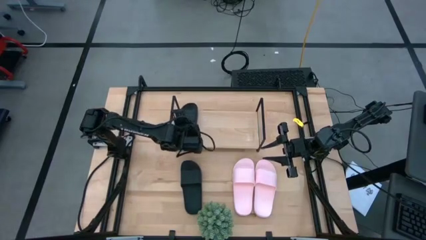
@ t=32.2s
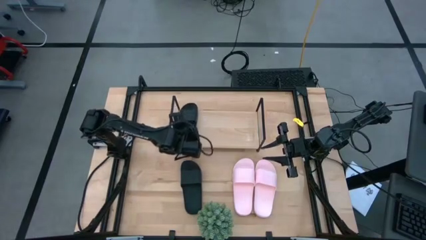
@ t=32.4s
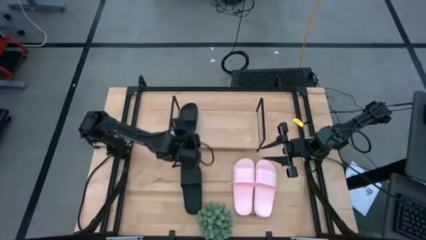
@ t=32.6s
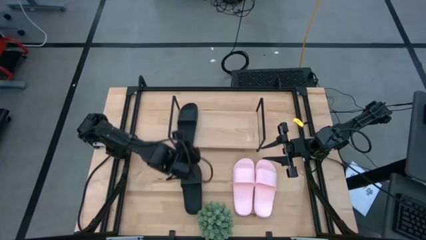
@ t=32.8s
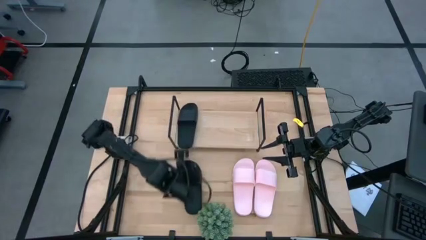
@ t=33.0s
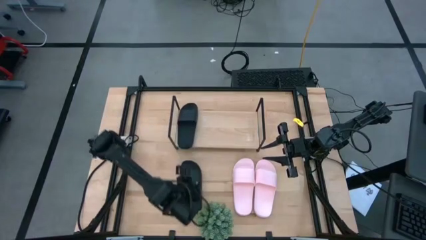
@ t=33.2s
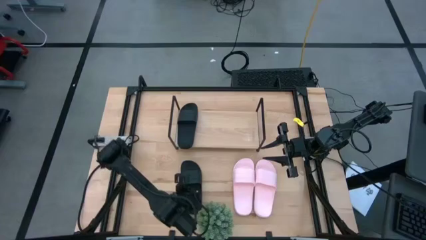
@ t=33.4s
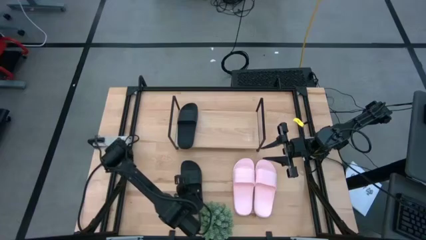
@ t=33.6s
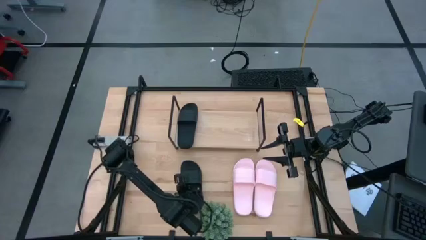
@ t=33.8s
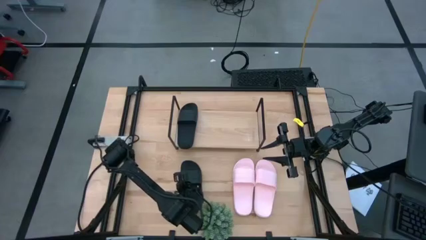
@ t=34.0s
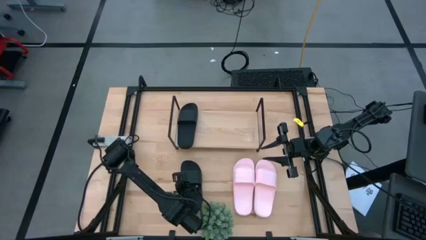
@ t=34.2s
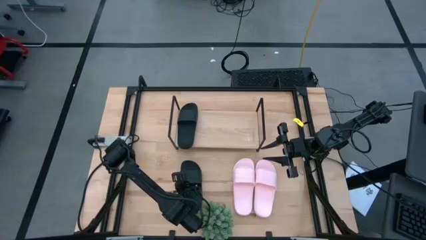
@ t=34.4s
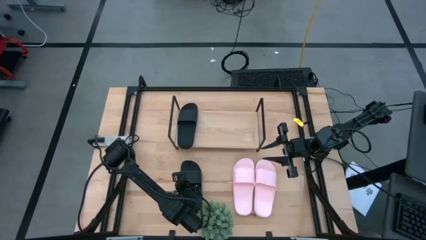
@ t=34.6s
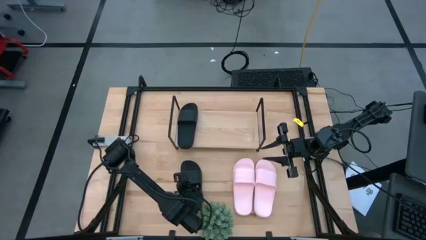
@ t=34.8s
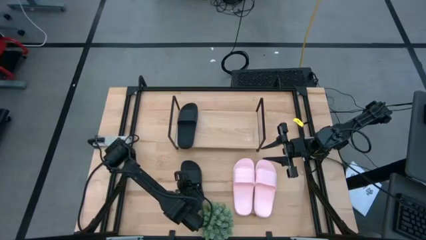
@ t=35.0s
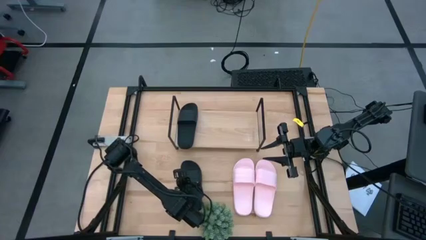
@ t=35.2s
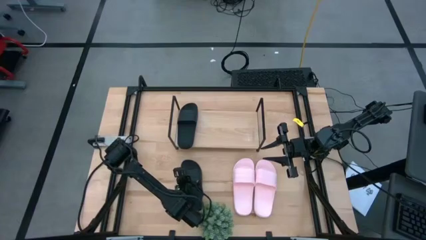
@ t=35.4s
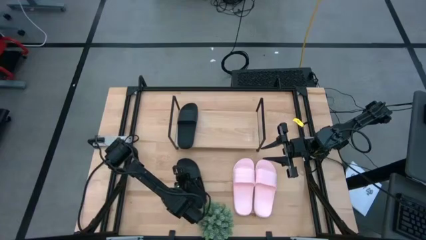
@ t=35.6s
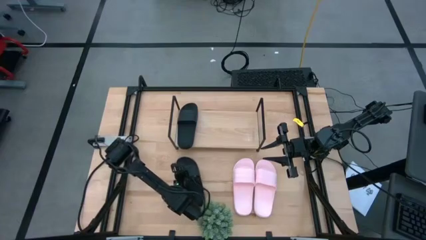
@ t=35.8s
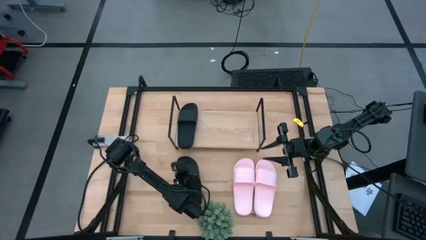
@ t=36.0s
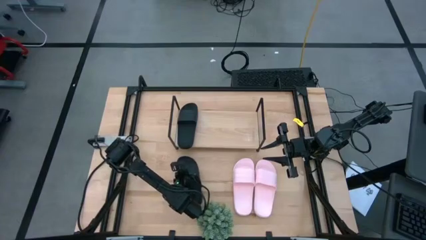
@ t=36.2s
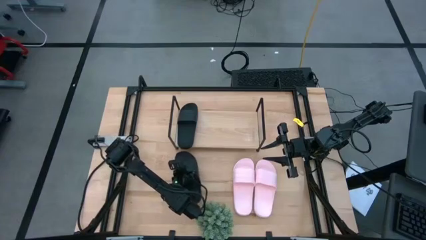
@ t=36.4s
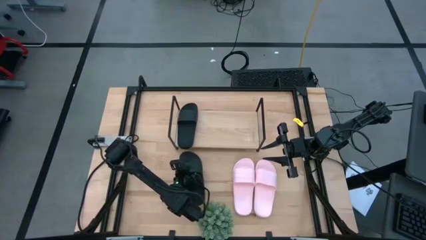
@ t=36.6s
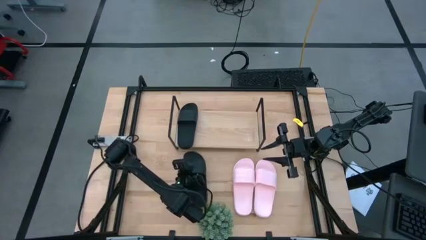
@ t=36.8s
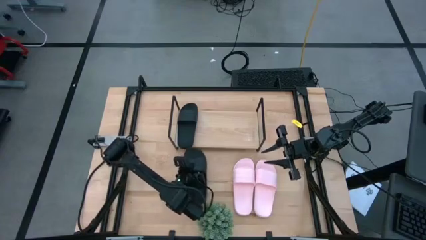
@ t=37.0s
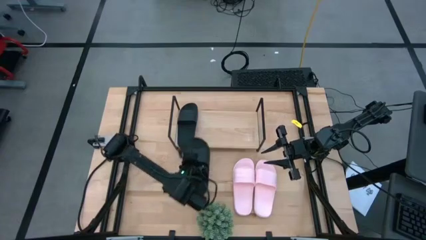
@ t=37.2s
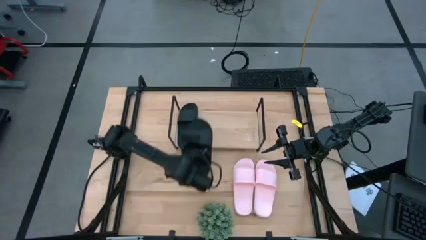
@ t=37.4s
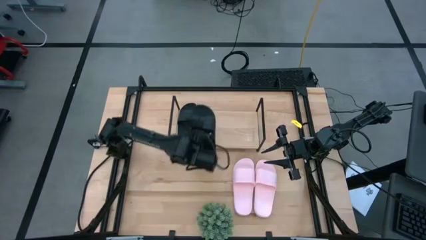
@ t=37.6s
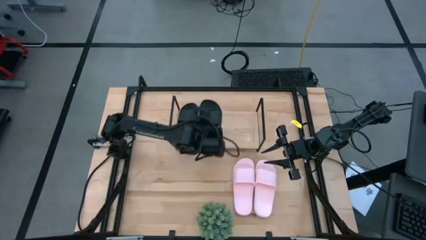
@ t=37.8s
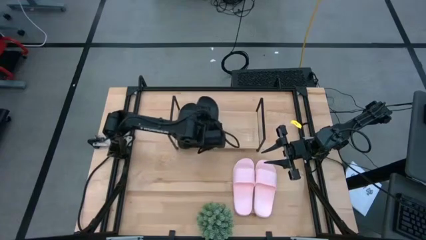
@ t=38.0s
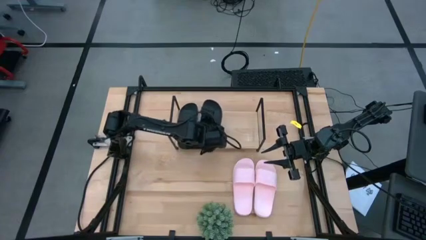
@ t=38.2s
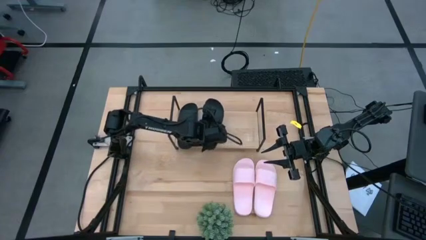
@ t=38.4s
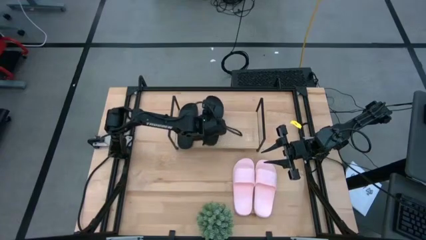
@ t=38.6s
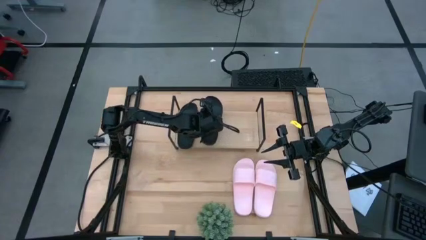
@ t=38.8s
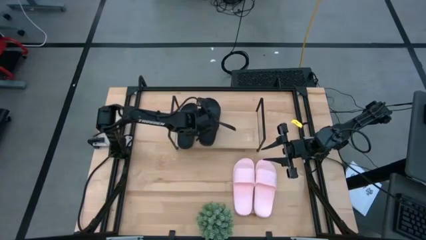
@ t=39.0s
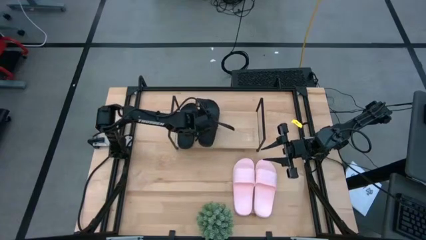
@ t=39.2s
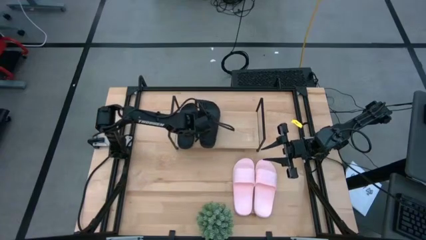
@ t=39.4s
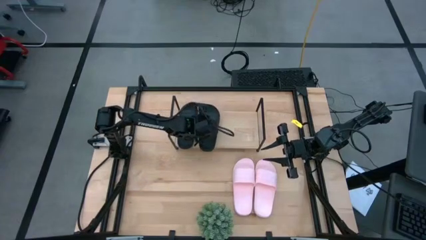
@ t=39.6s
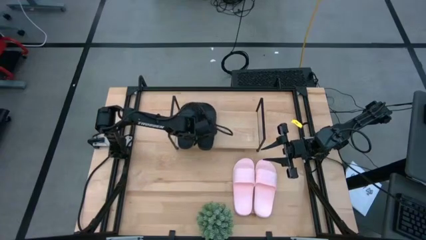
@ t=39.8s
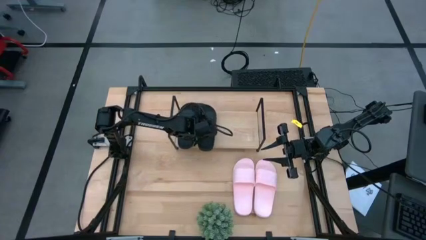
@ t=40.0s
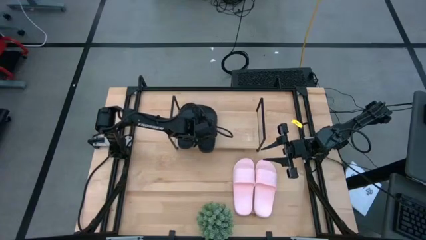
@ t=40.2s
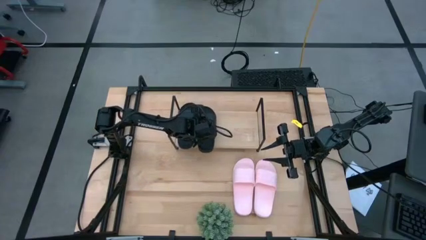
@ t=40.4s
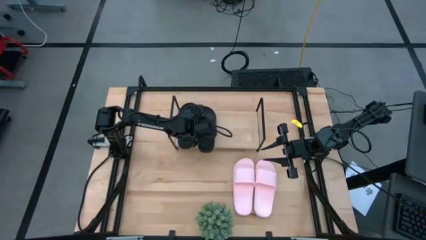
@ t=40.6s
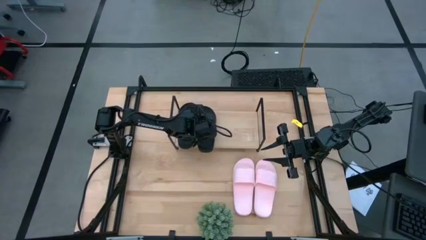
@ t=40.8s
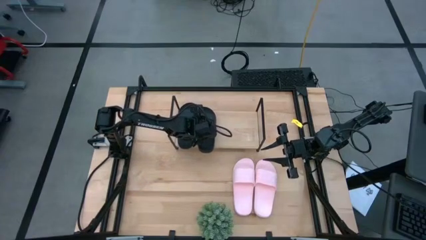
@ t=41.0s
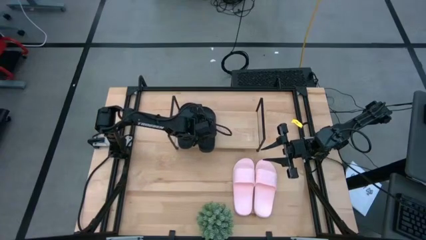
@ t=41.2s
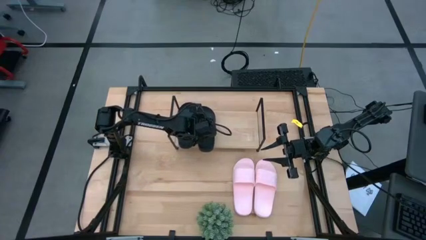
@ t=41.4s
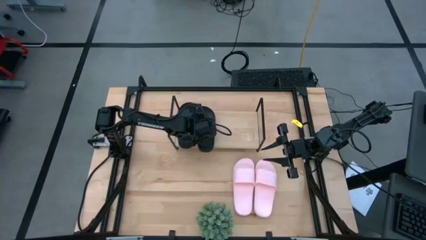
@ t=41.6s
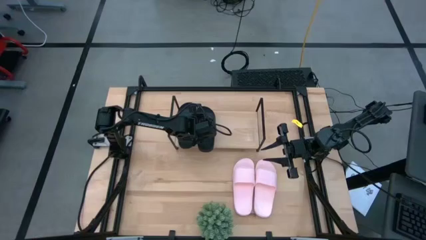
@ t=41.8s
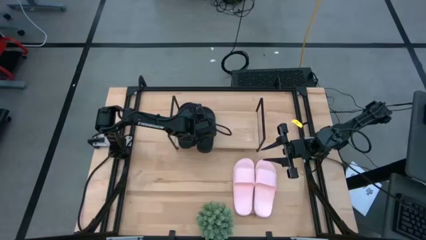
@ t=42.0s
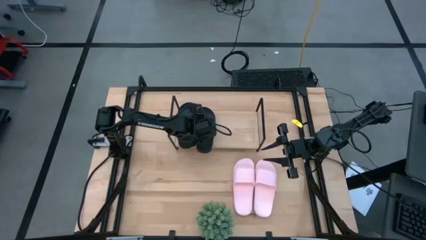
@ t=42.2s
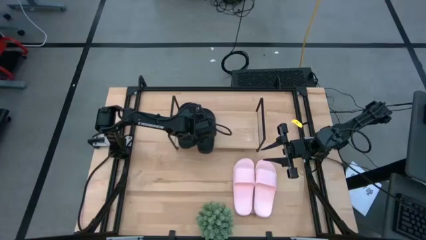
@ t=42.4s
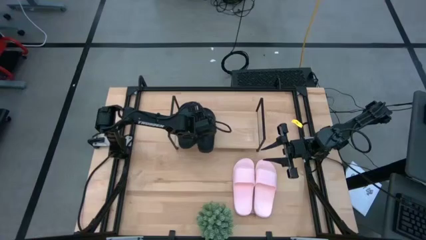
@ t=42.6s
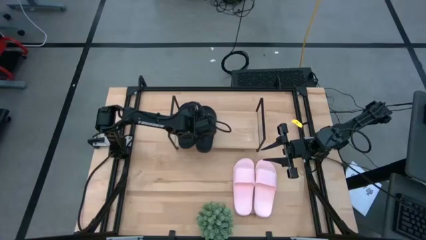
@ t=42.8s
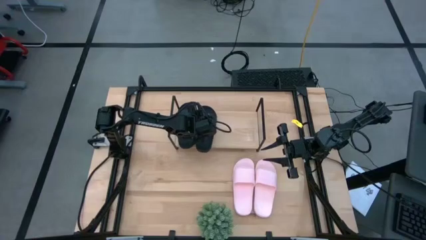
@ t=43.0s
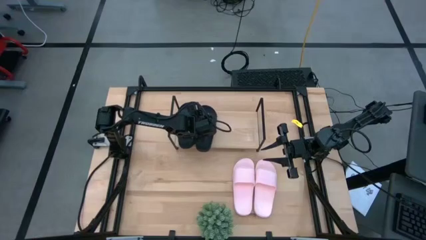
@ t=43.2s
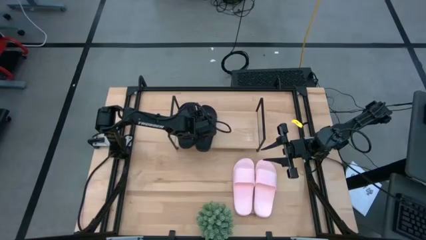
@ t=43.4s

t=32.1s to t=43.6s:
Task: Pick and place slides into the shelf
Put the black slide on the shelf

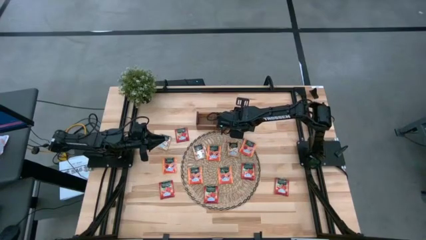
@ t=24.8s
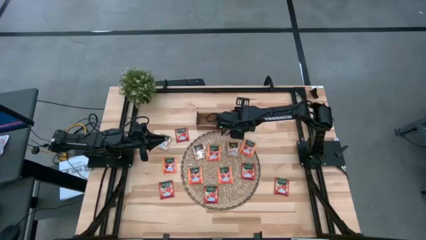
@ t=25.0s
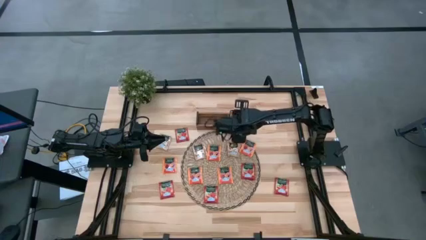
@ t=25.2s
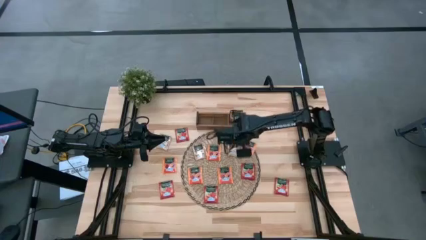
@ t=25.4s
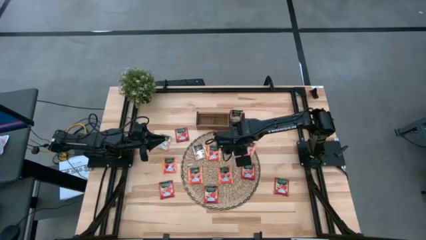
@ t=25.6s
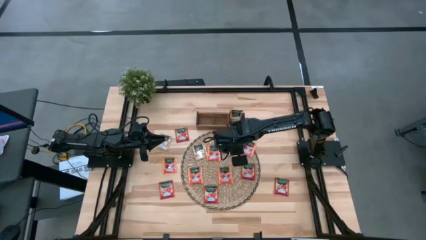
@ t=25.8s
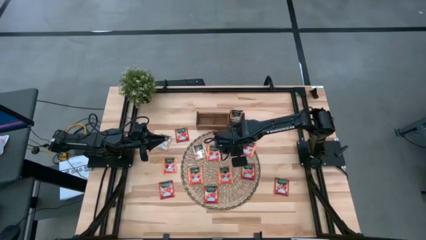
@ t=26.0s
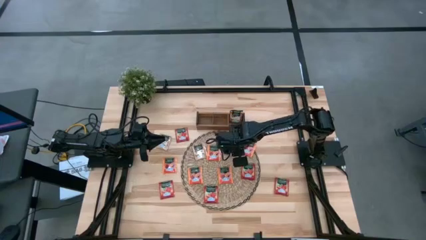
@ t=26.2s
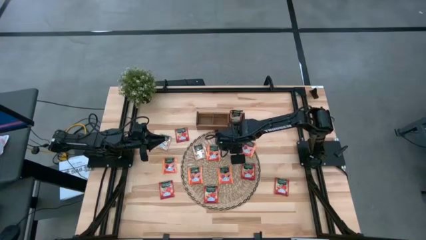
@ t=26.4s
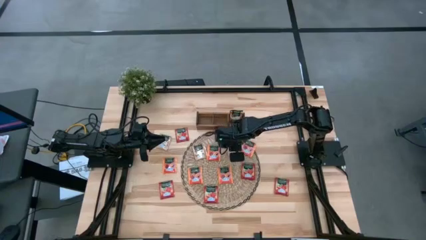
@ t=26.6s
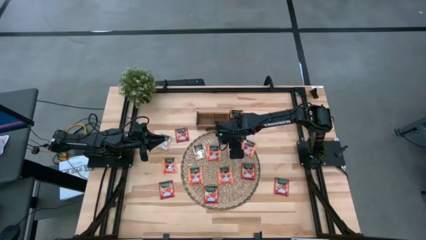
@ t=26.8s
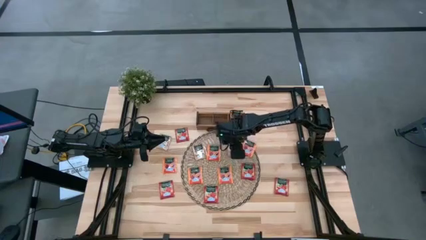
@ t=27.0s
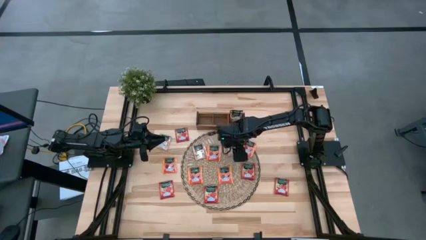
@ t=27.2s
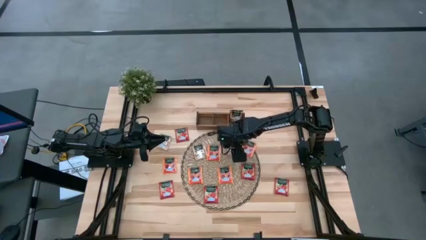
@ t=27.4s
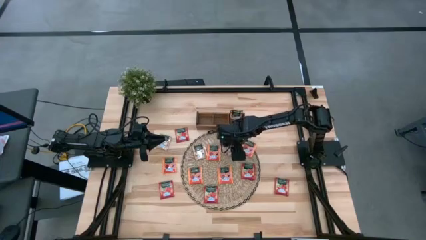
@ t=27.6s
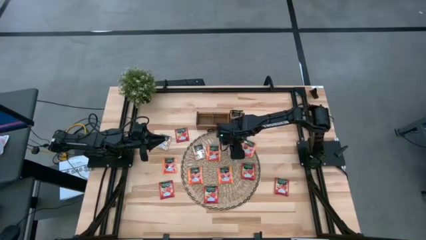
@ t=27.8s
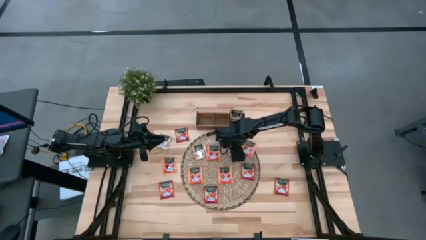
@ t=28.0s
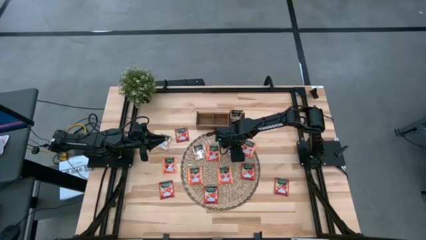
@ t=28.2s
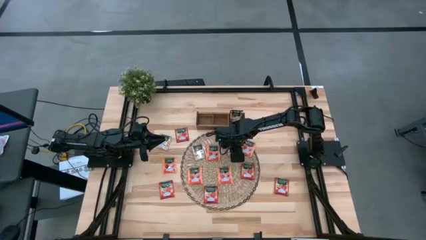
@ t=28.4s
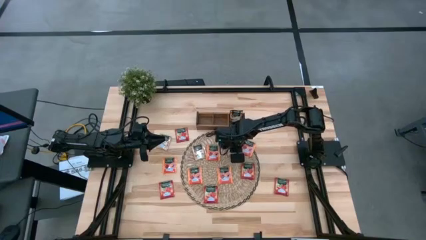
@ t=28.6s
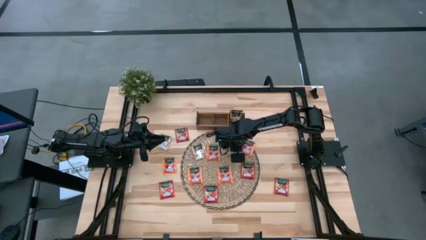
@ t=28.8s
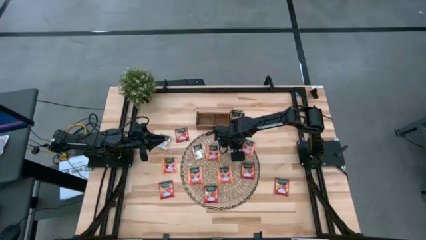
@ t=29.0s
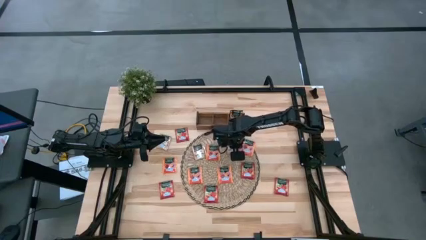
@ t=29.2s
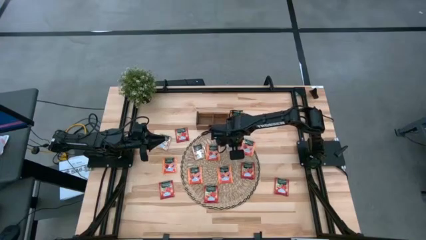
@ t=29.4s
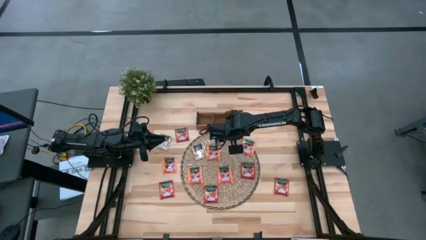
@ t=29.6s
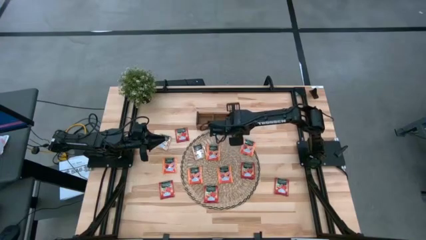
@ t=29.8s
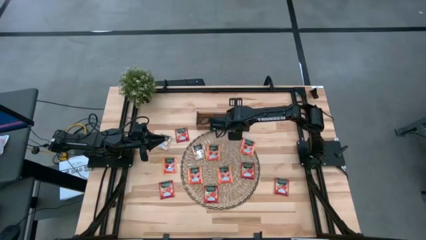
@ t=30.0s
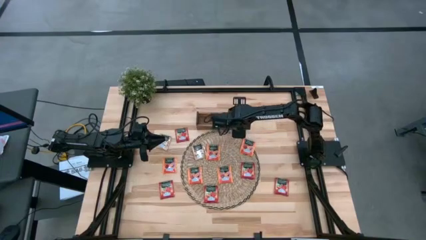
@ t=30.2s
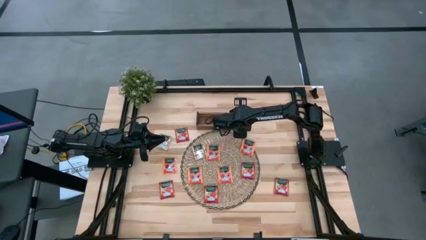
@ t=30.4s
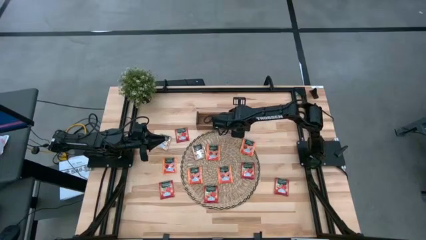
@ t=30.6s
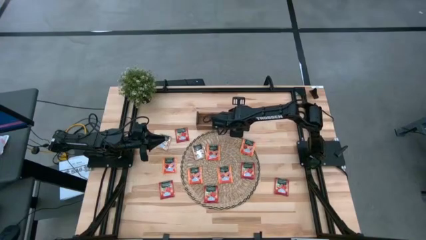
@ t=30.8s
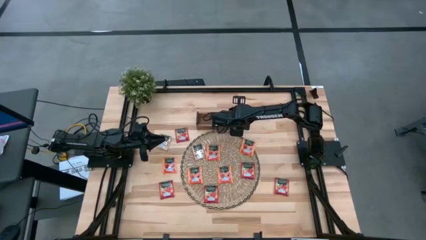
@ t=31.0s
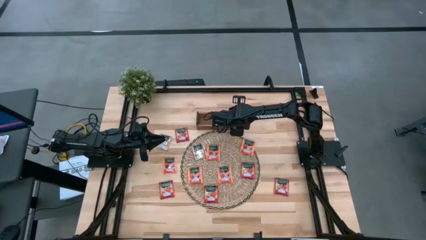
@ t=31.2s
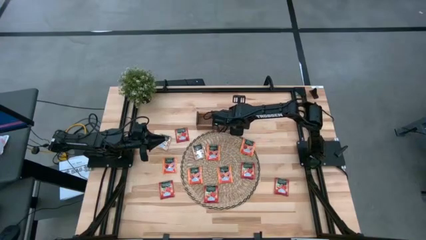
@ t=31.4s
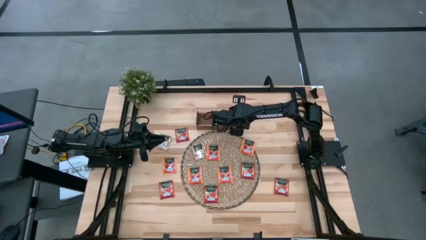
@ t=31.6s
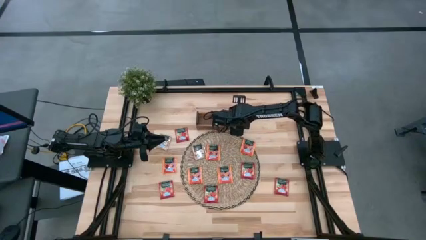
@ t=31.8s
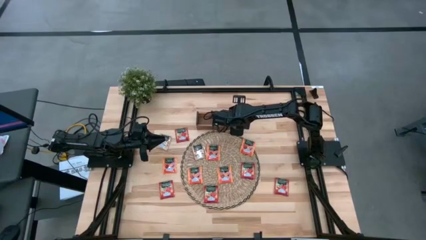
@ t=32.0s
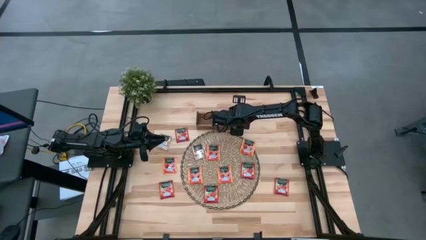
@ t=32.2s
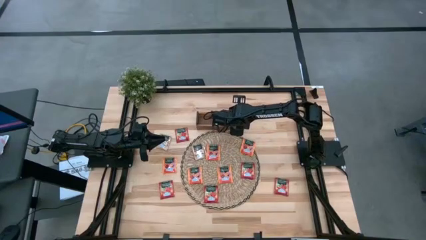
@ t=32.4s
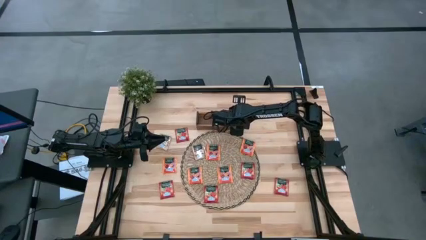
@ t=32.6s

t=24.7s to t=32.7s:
Task: Pick & Place Tea
Put the brown tea bag into the right section of the wooden organizer
